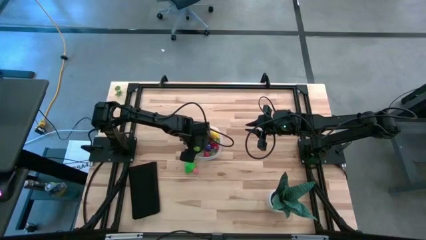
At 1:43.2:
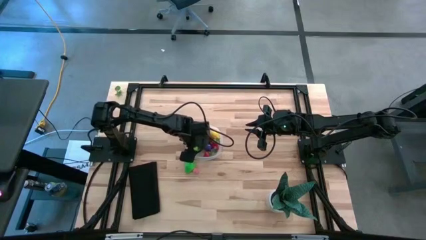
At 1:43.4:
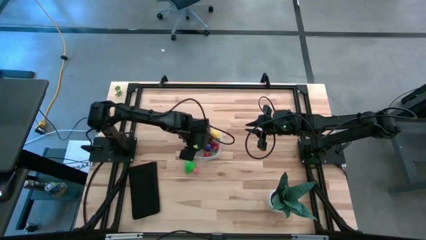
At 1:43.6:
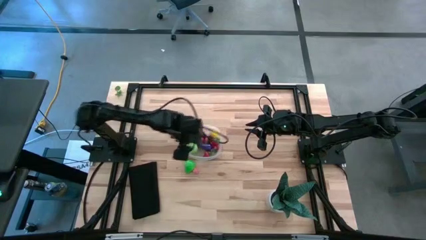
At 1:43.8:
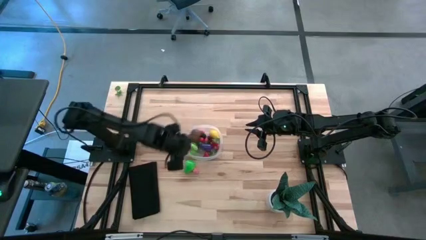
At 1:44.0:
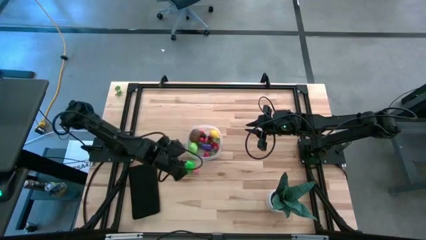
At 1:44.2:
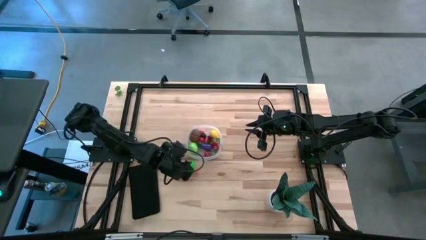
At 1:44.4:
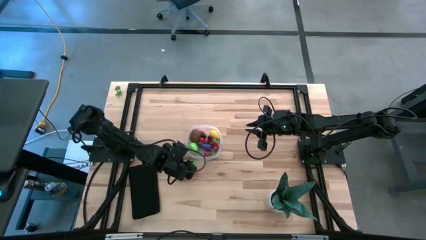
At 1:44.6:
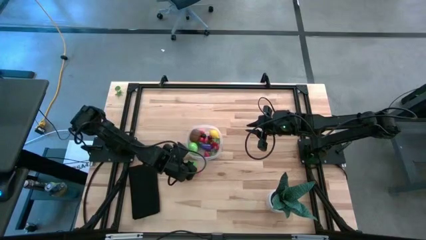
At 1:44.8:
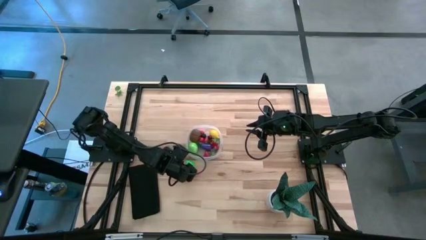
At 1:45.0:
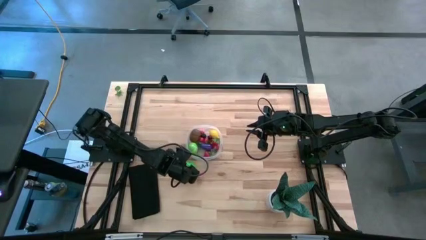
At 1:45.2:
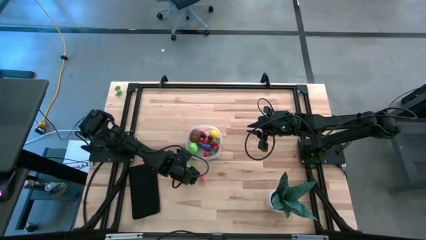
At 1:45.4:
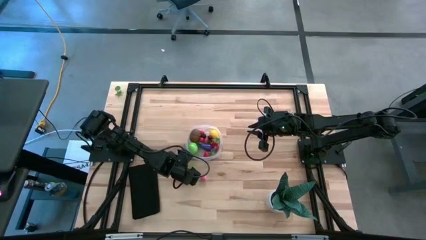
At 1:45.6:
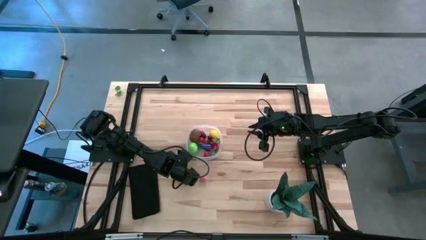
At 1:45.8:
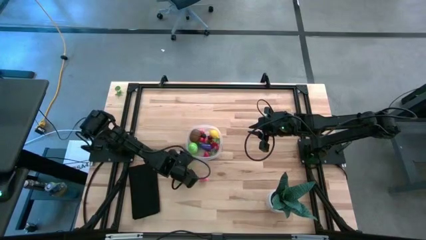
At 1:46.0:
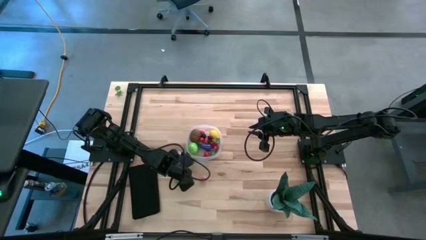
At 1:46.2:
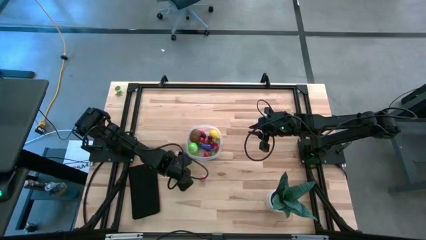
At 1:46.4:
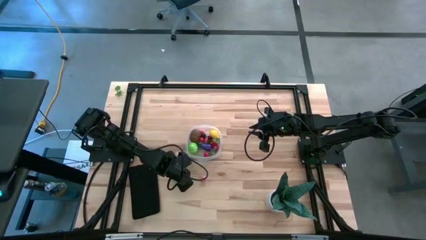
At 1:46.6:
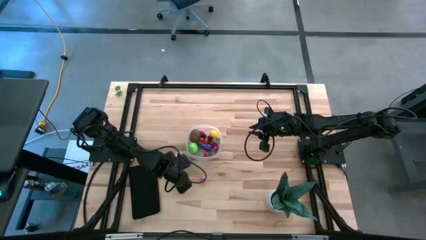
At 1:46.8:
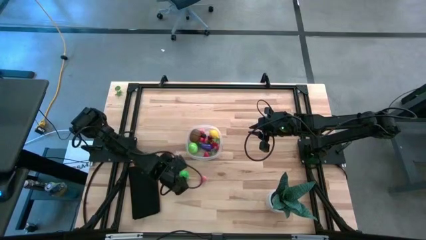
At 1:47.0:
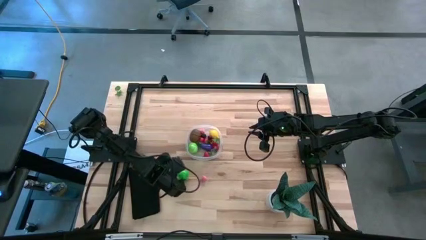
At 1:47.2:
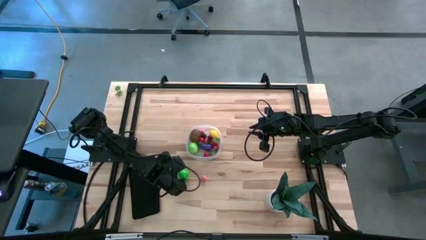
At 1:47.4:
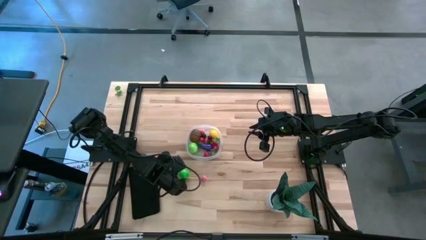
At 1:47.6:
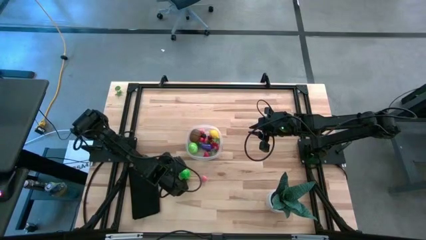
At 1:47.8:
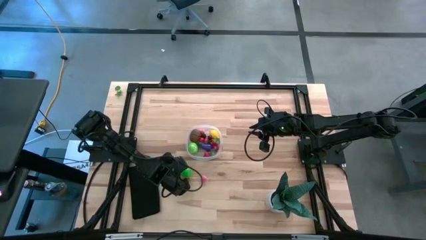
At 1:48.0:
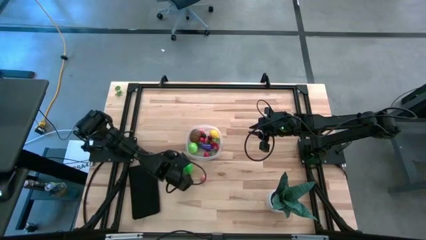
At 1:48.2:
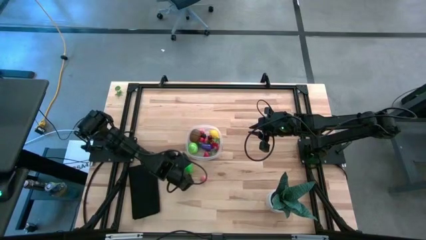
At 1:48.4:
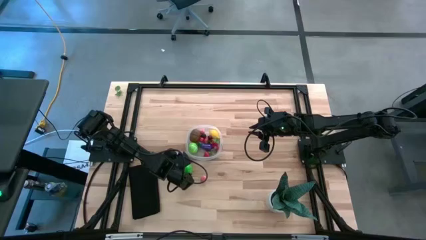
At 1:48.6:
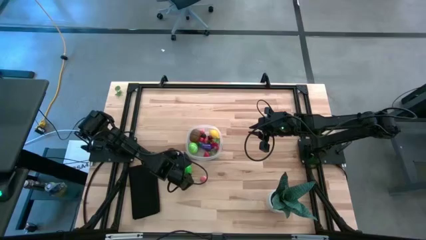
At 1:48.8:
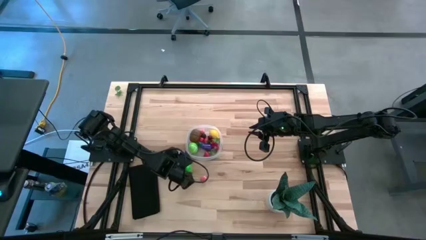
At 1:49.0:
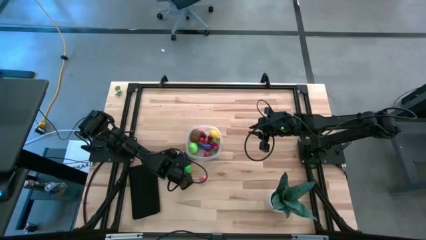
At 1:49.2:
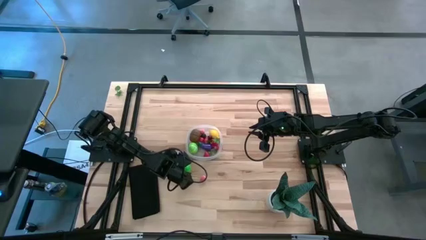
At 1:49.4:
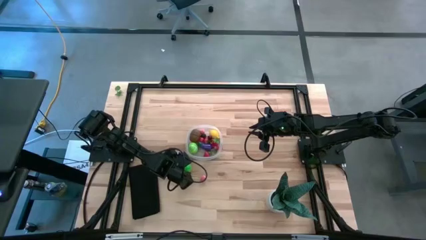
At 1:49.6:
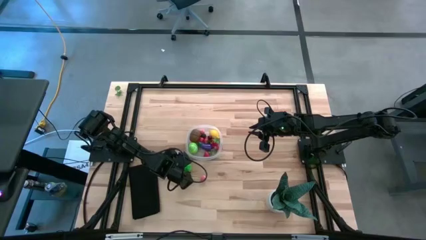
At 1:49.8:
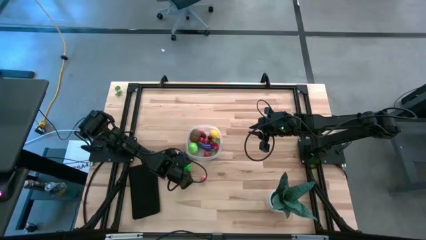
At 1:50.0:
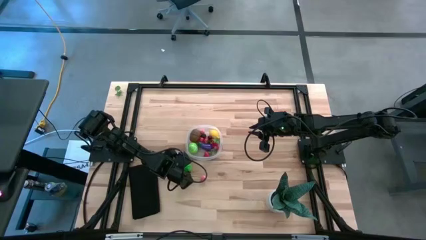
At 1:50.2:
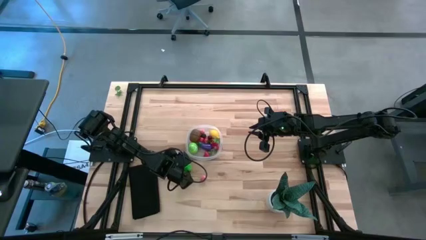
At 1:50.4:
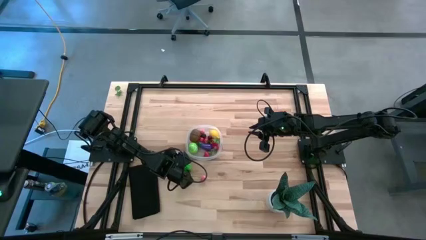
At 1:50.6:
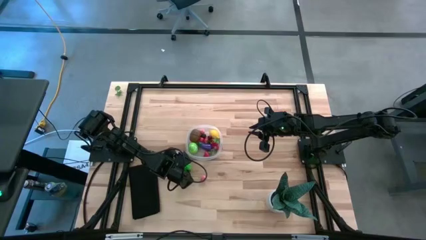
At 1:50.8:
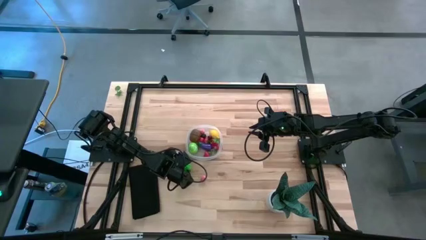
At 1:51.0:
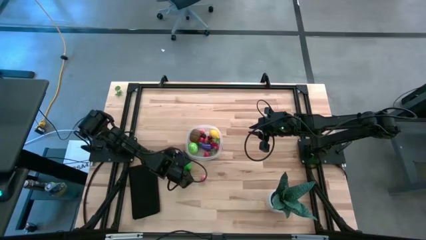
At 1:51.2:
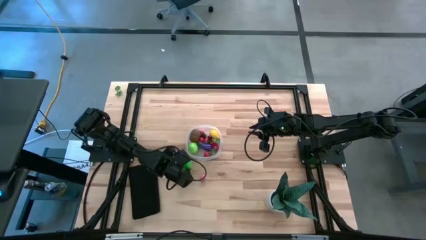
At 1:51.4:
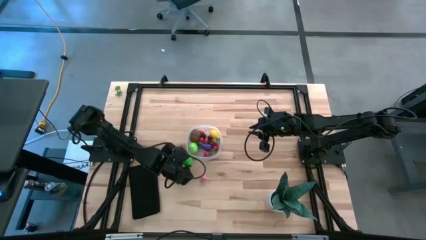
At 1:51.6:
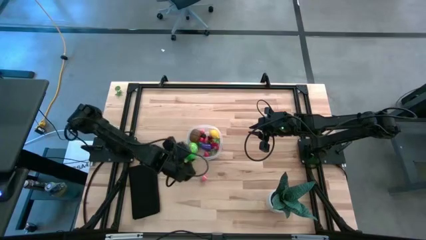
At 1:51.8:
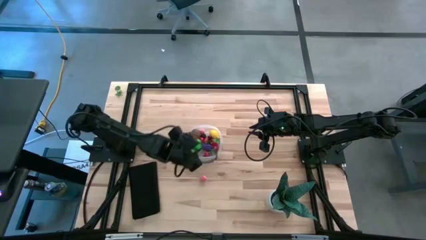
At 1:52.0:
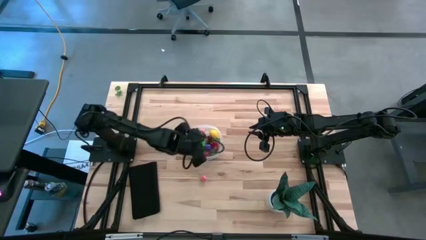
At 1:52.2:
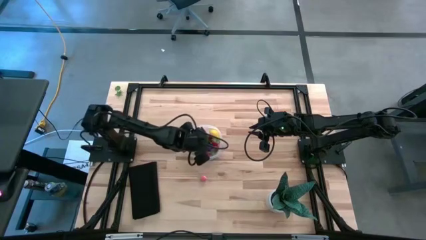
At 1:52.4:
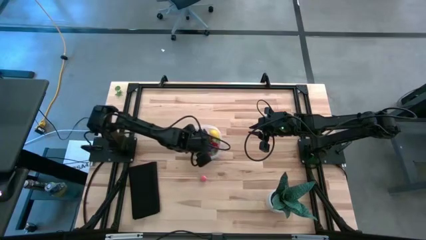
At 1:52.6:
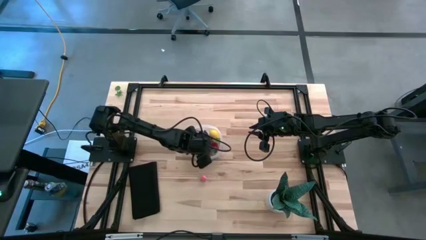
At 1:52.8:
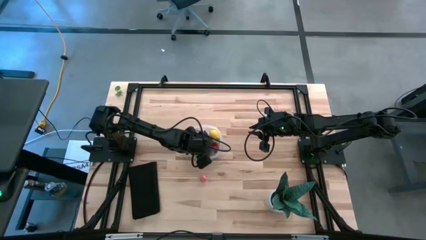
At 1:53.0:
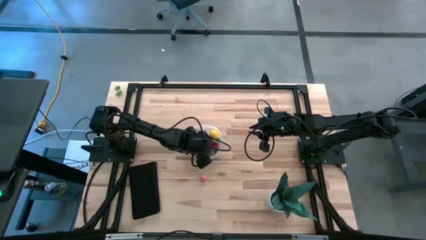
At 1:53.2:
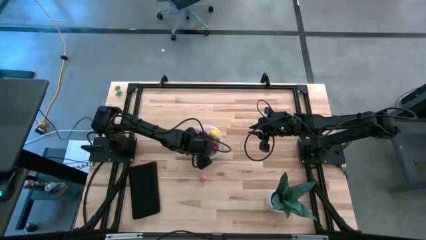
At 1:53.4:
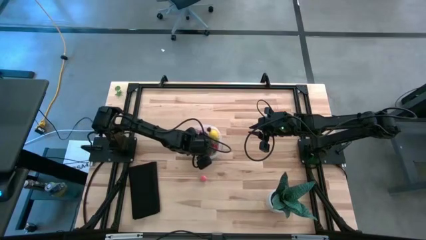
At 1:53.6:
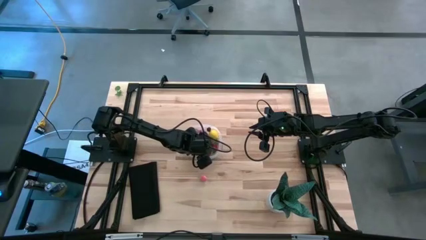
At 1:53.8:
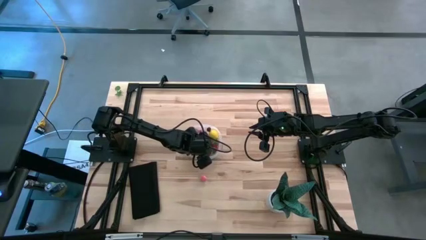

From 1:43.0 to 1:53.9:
Task: Pick and placing Produce into tupperware
Put the pear into the transparent bin

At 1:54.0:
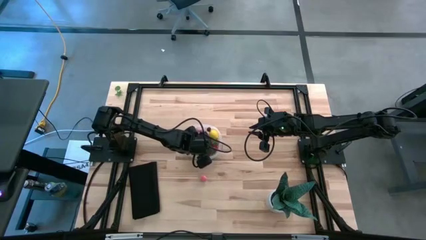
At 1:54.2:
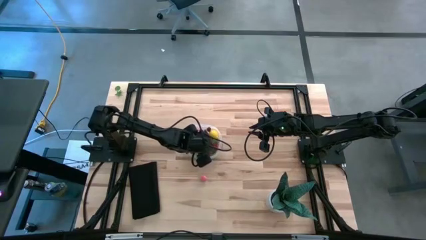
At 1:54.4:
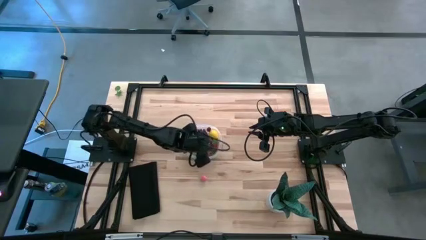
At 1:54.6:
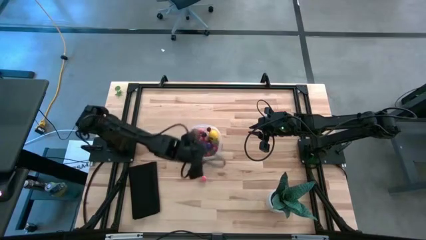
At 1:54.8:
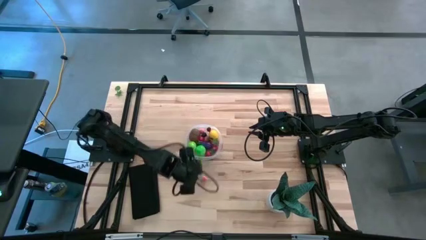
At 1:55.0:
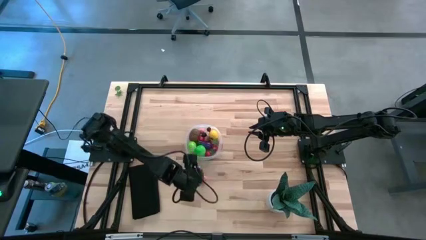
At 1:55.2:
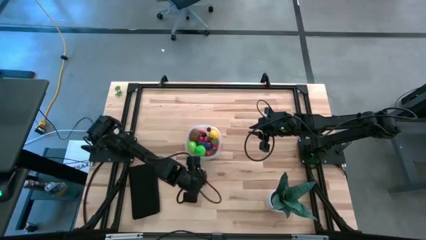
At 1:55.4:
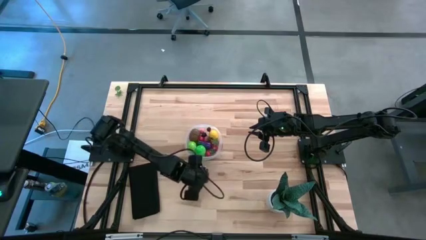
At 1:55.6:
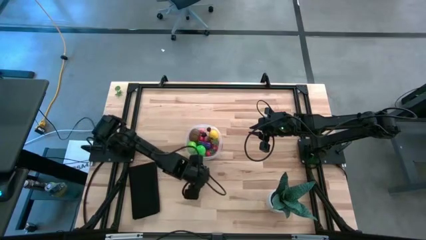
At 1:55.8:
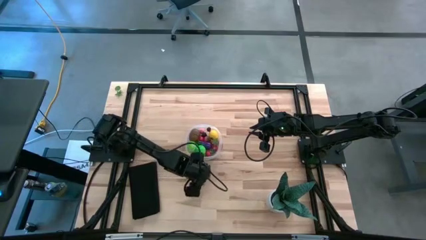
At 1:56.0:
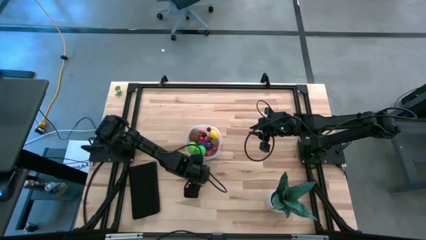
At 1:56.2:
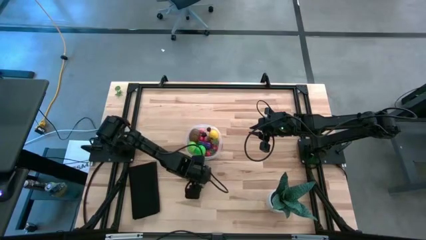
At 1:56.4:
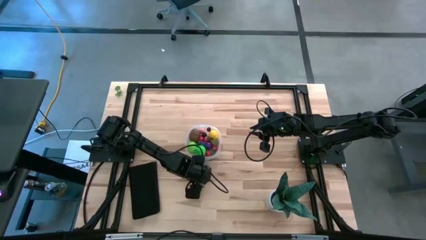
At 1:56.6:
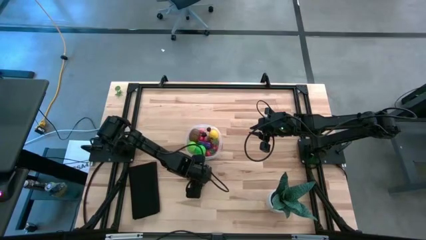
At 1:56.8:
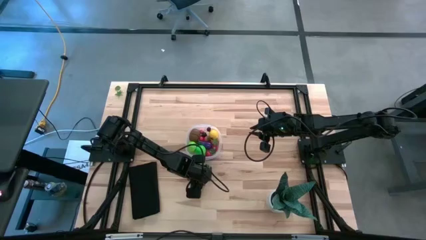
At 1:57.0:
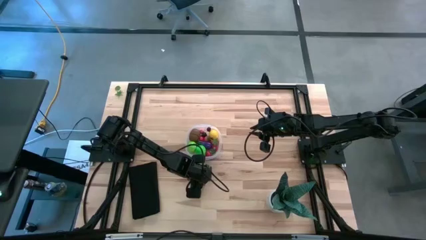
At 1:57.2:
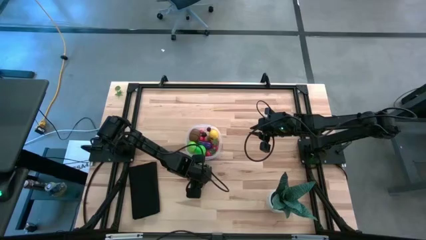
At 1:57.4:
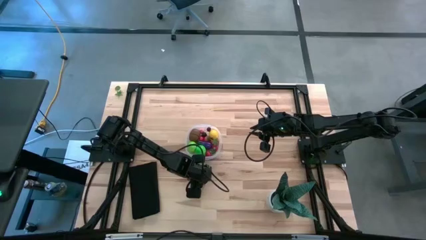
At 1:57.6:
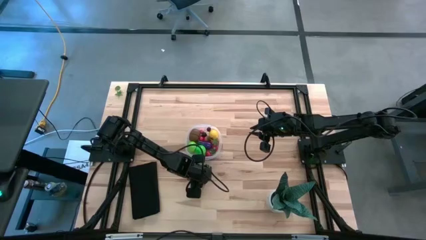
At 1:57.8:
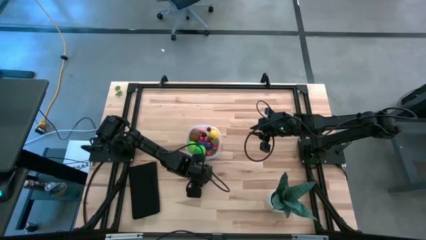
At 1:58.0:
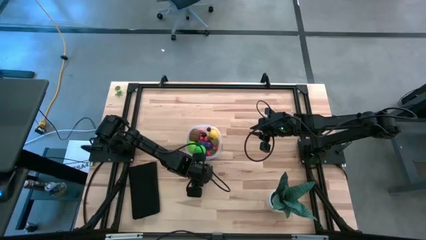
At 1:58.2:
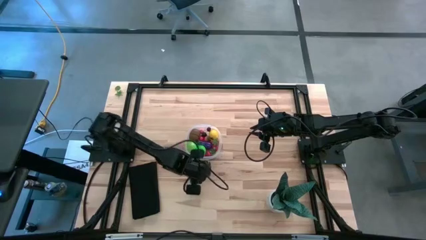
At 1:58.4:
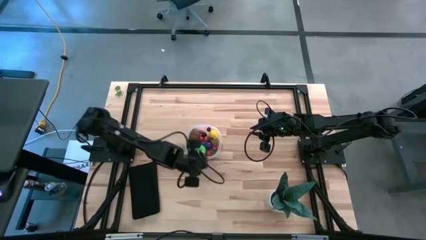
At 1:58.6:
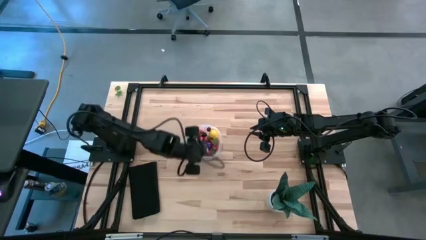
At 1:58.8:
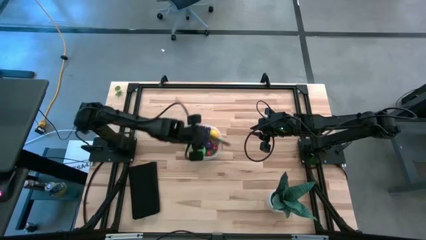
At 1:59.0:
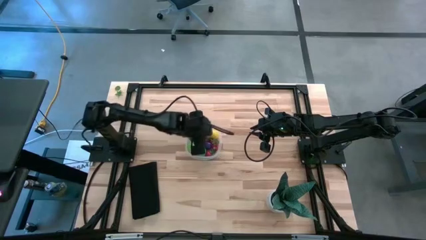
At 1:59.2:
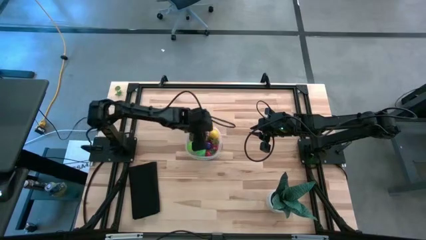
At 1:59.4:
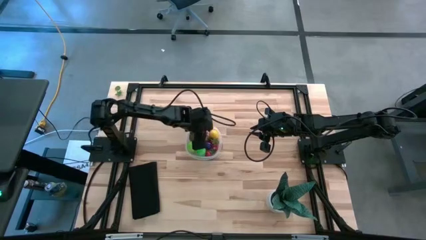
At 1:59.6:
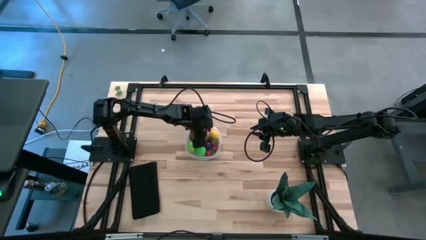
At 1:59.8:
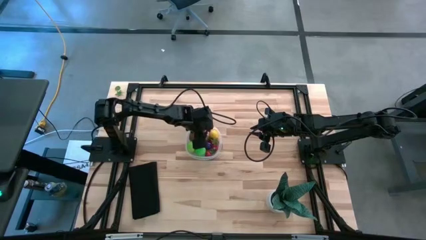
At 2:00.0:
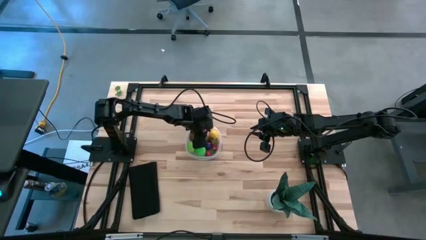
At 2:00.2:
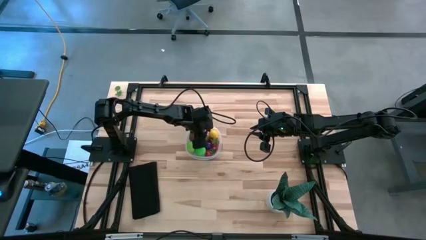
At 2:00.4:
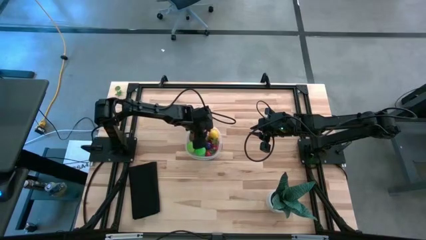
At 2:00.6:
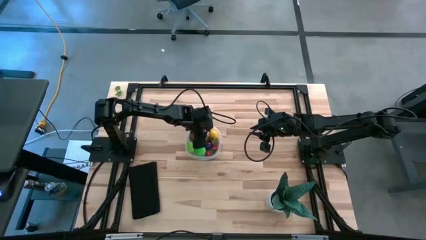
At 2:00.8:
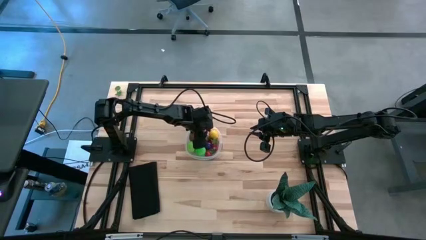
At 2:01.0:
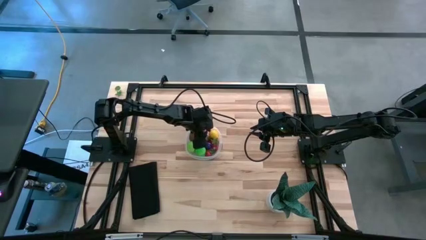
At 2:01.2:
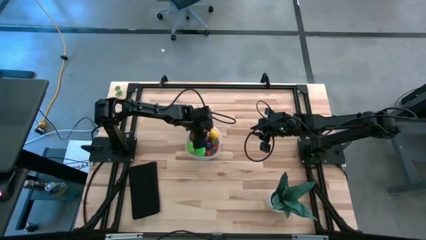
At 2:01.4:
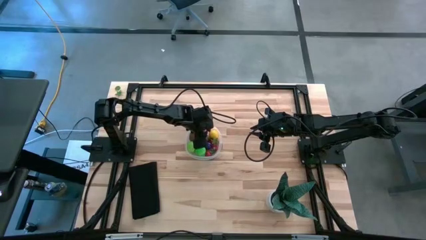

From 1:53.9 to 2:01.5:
Put the peach into the transparent bin
